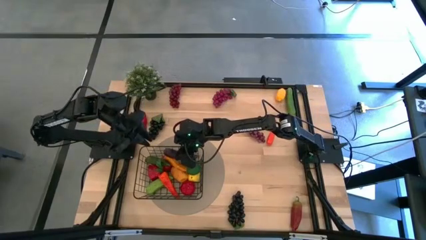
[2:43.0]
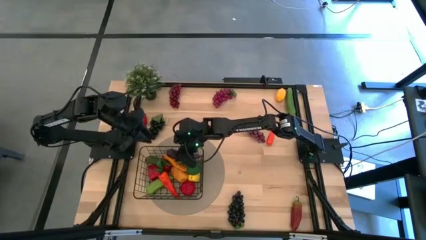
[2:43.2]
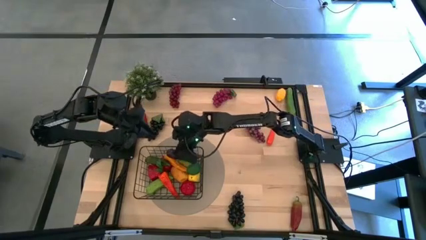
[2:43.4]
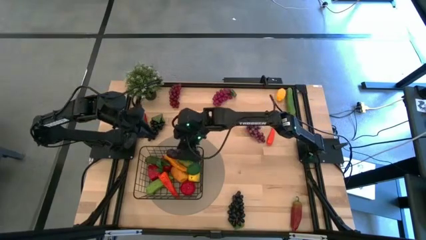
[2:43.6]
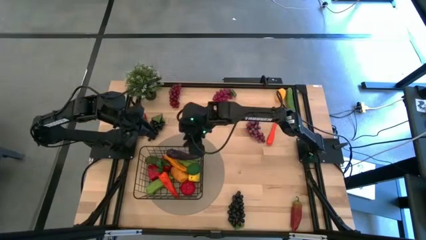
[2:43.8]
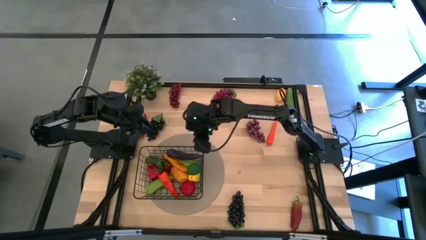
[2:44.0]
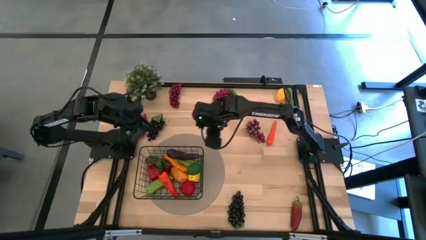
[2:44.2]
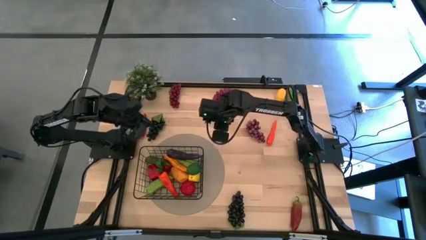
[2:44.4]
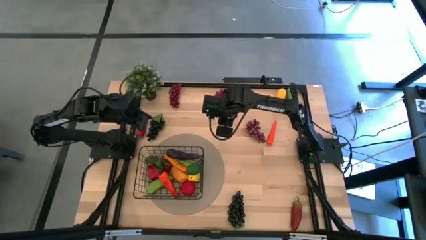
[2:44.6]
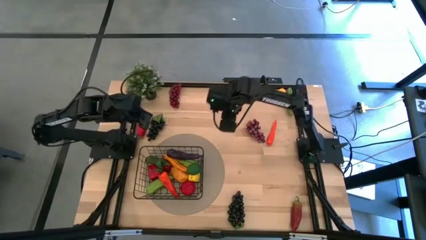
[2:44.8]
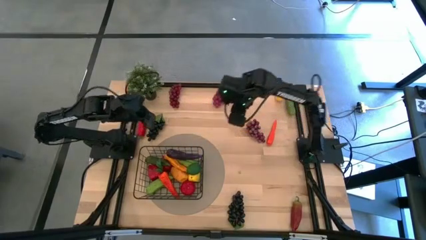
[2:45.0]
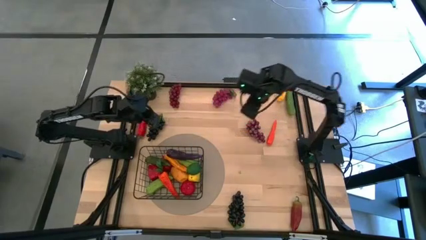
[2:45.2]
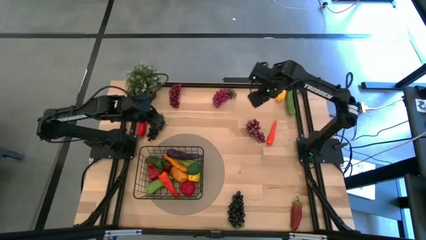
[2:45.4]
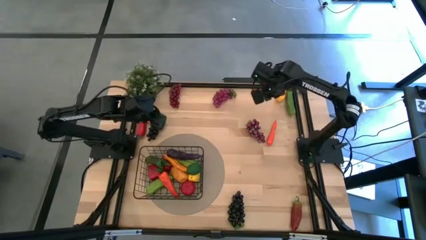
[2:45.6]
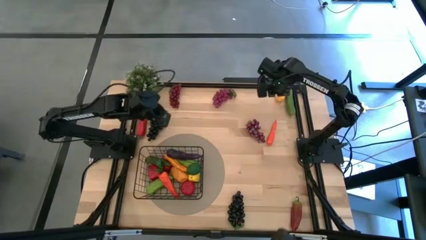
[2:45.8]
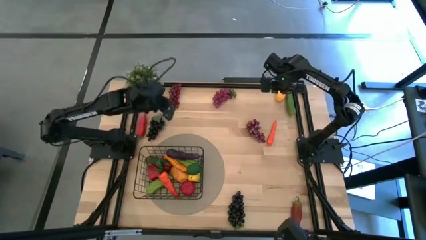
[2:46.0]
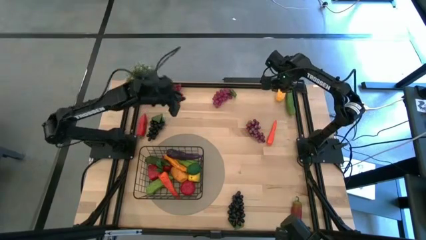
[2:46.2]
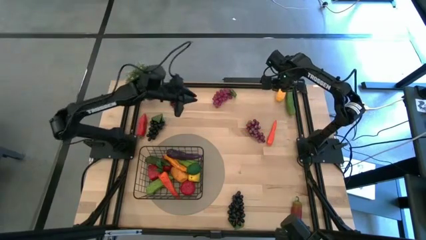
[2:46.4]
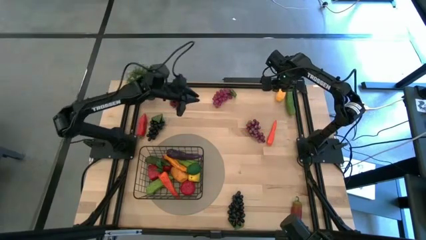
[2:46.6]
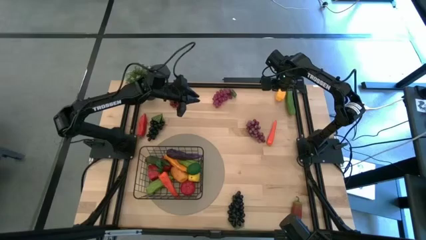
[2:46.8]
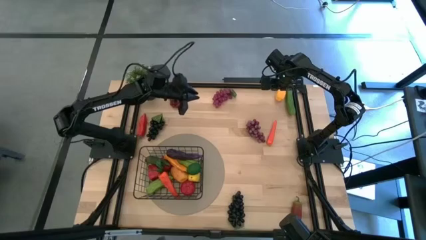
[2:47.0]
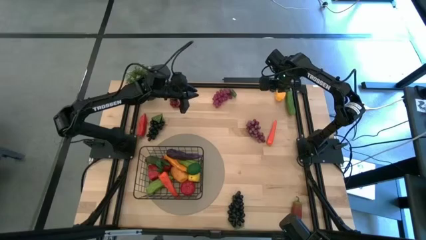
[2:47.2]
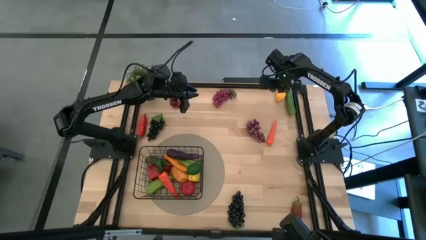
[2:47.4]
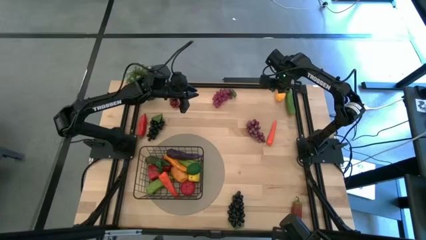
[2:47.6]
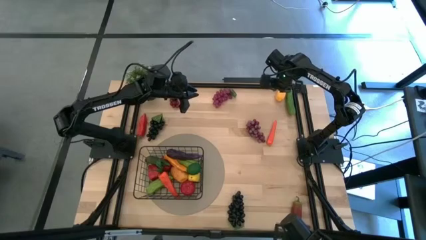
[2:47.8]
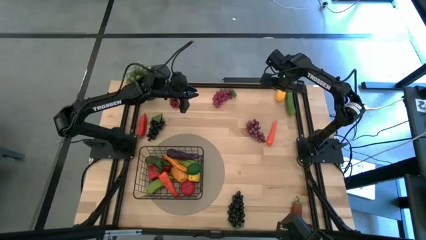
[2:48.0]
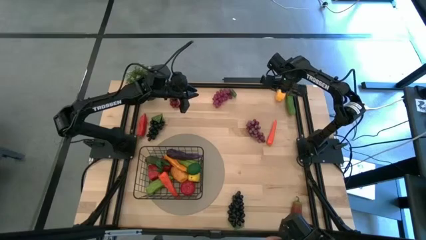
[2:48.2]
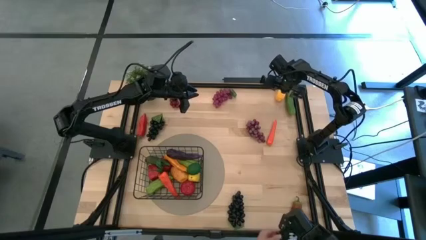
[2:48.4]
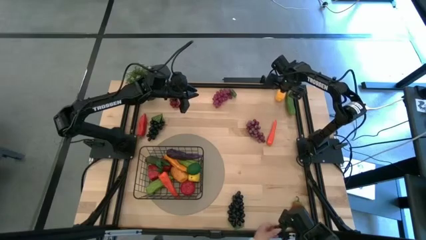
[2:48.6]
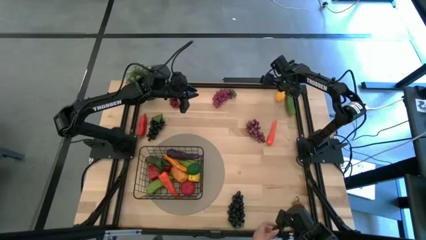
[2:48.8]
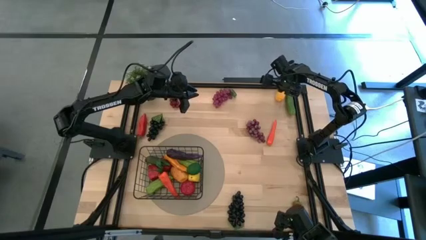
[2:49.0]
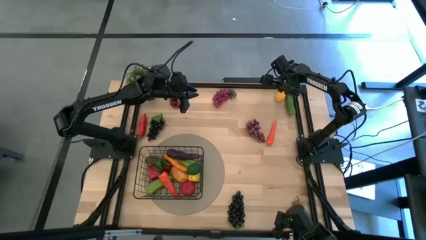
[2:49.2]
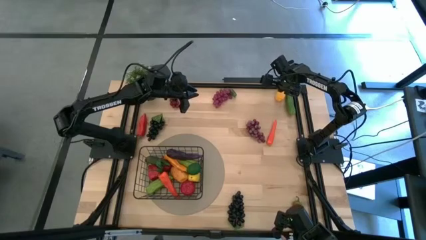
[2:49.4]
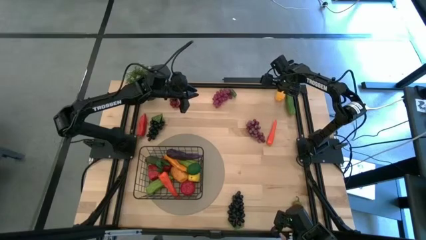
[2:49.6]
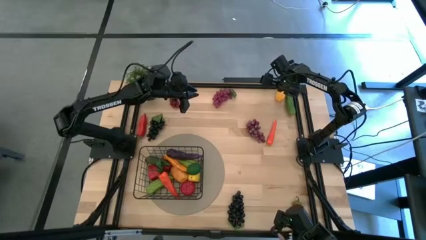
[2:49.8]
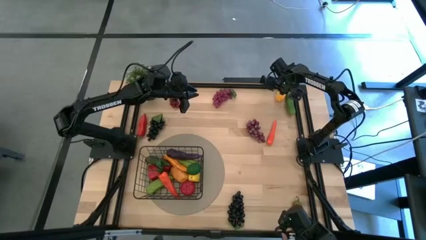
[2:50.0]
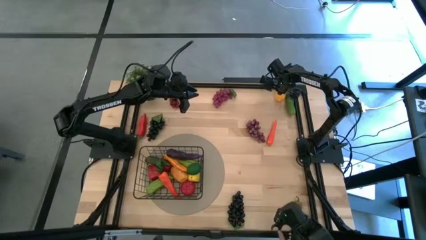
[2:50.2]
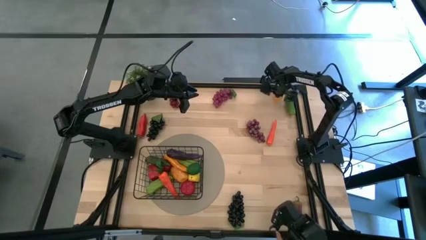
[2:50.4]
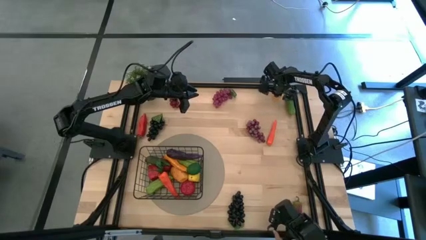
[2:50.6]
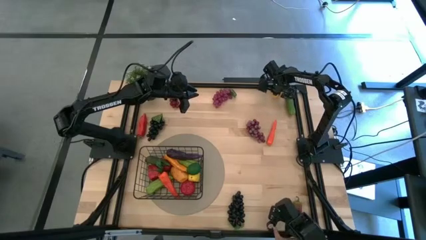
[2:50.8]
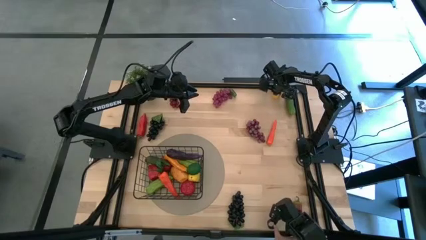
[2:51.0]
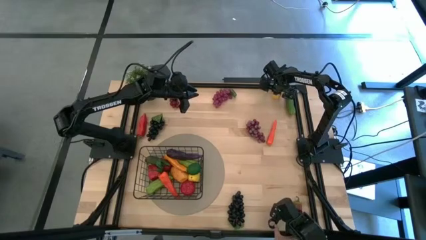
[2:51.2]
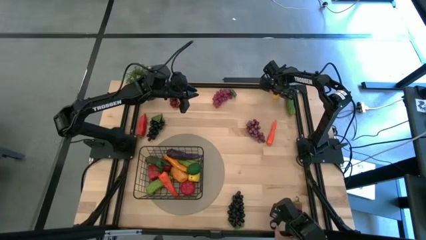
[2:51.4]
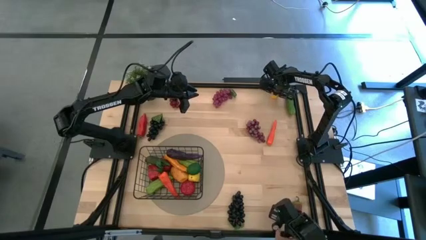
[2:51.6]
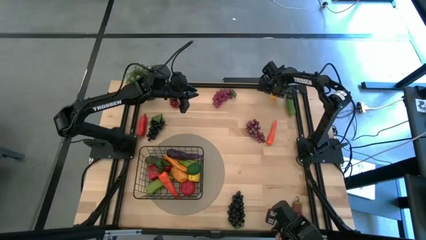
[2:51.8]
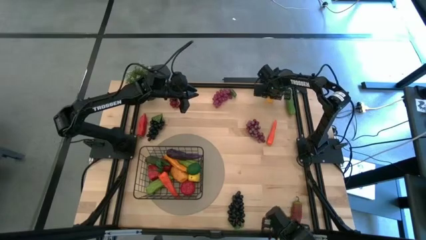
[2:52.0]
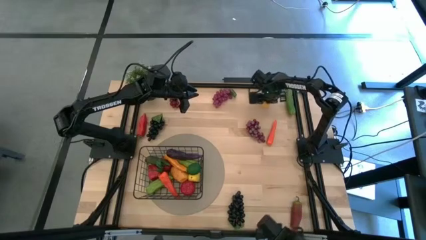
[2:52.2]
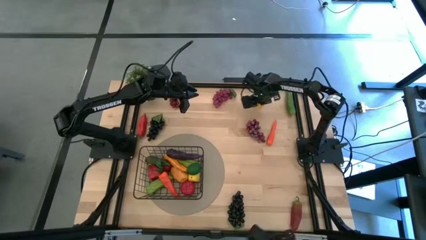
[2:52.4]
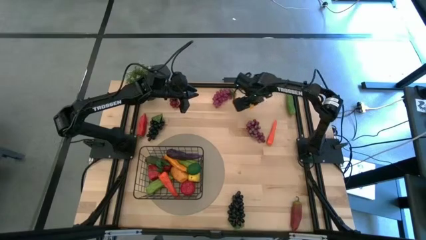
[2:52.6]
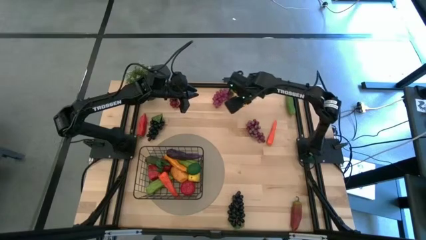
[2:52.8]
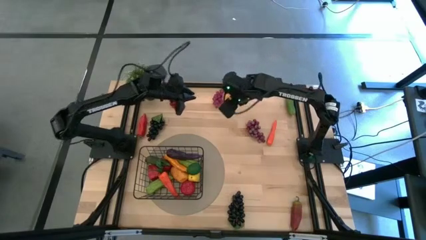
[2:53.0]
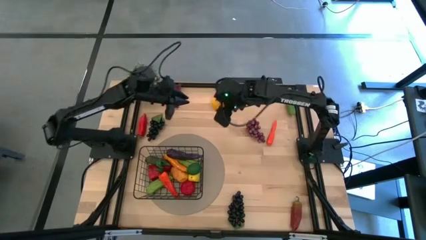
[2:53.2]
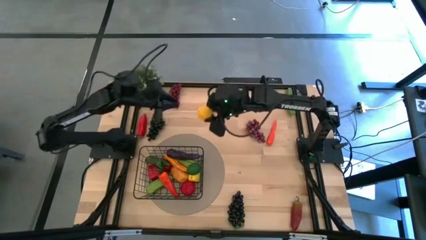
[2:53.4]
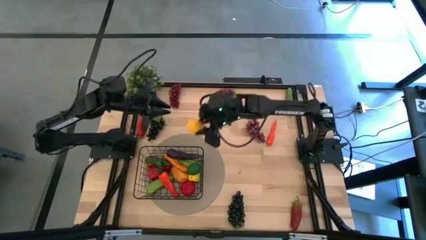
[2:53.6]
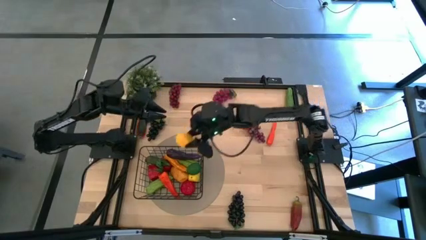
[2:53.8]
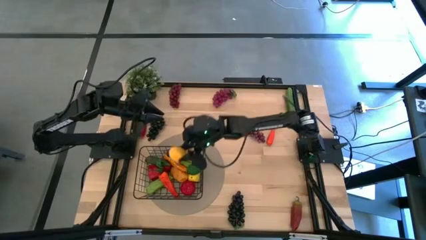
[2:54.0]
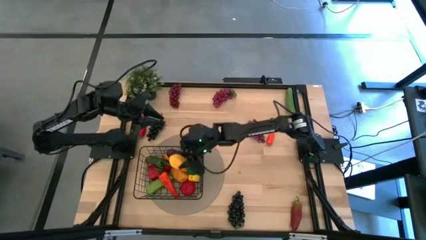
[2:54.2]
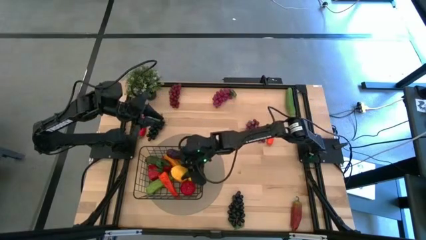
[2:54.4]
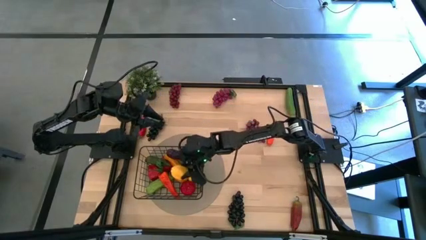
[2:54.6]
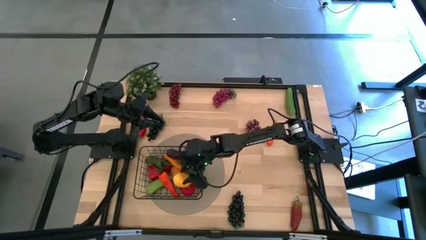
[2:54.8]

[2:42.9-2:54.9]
Task: Build produce basket
Put the yellow lemon into the black wire basket

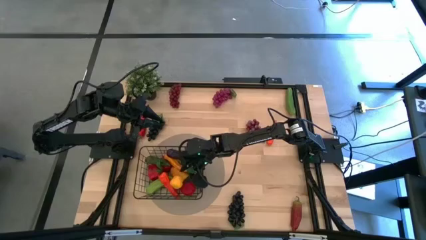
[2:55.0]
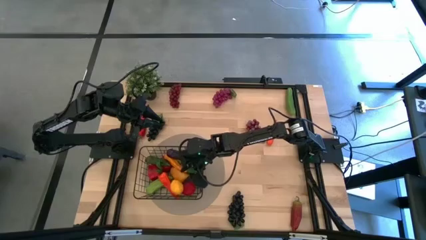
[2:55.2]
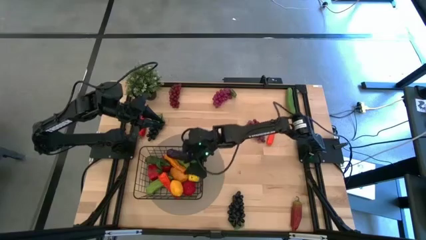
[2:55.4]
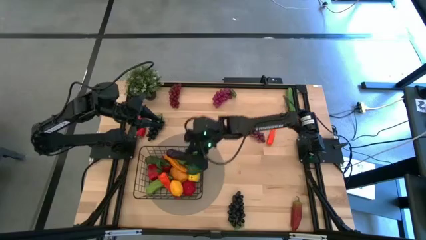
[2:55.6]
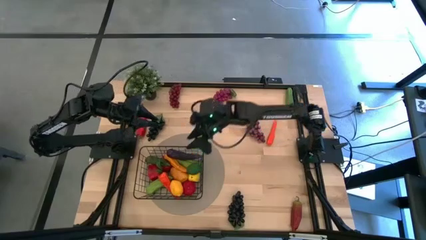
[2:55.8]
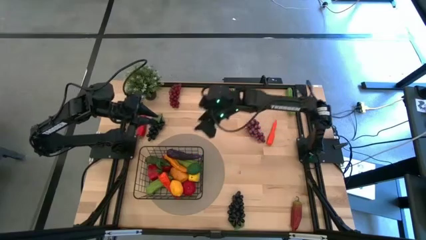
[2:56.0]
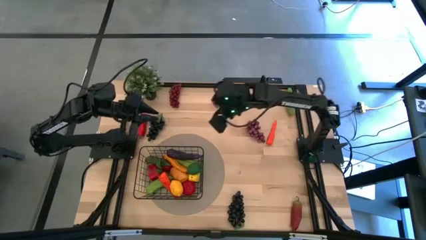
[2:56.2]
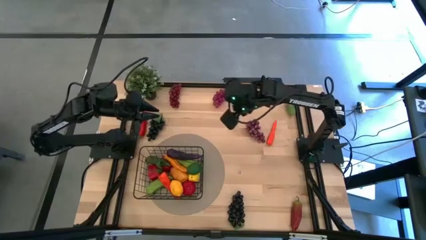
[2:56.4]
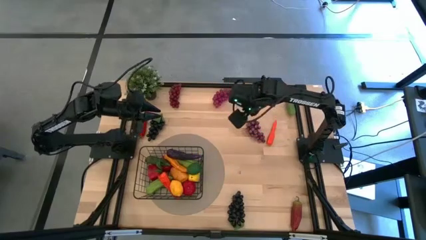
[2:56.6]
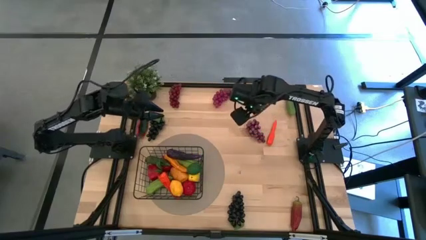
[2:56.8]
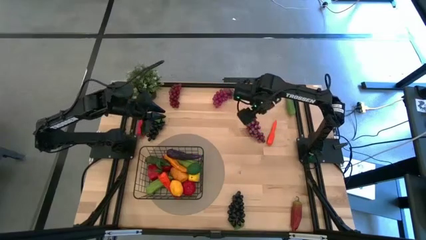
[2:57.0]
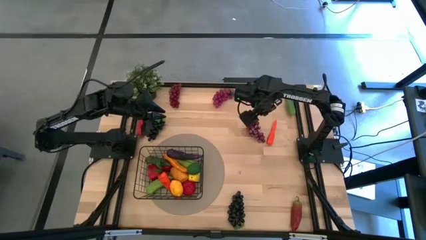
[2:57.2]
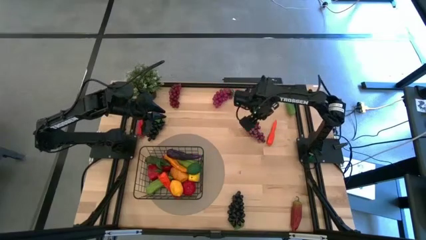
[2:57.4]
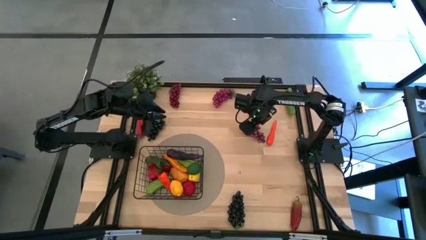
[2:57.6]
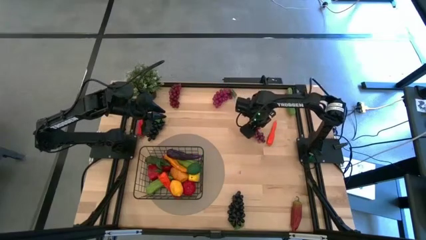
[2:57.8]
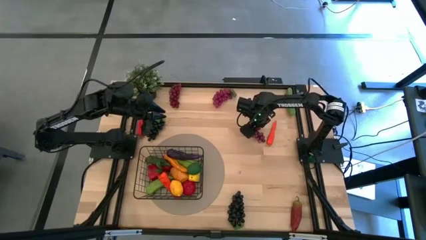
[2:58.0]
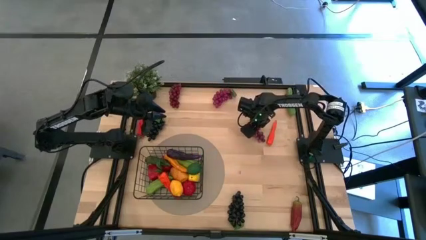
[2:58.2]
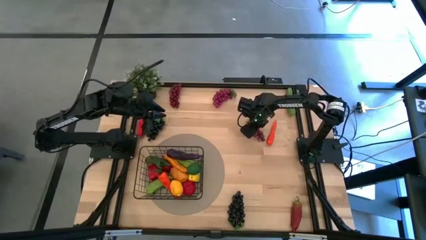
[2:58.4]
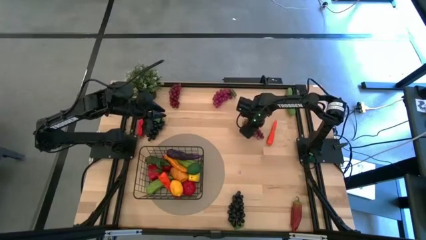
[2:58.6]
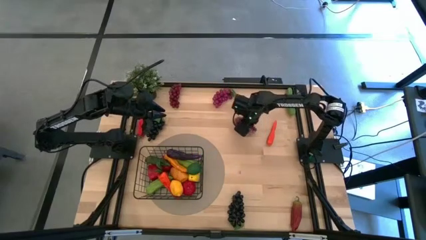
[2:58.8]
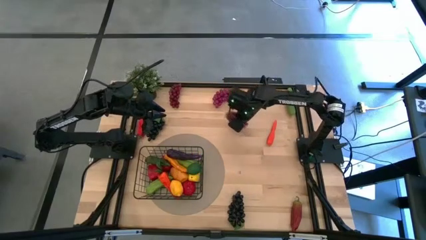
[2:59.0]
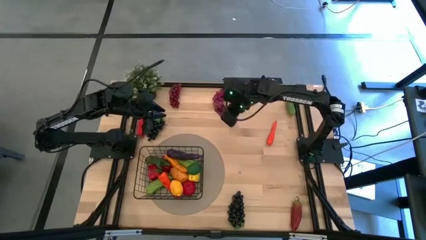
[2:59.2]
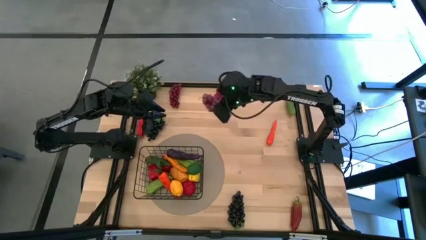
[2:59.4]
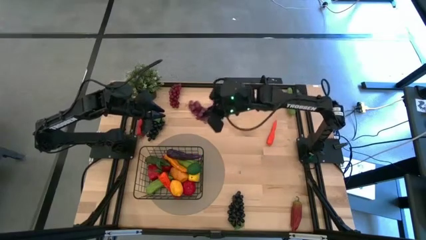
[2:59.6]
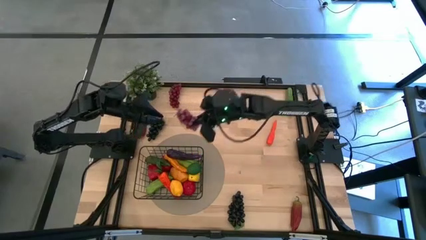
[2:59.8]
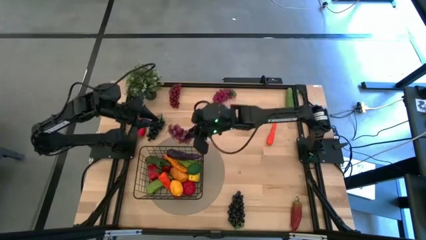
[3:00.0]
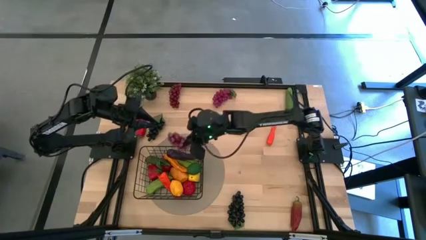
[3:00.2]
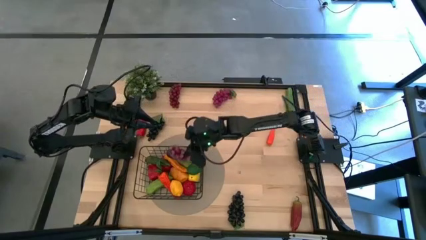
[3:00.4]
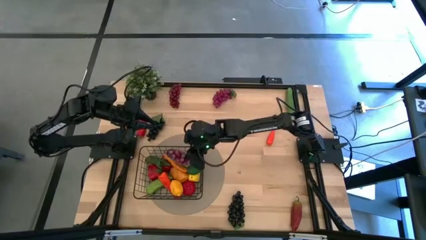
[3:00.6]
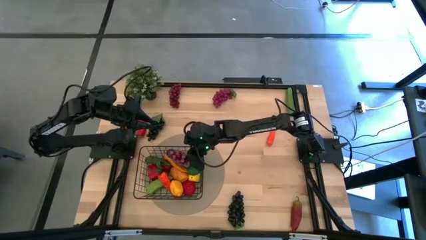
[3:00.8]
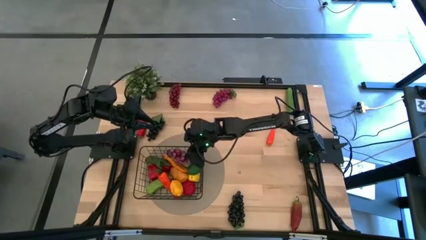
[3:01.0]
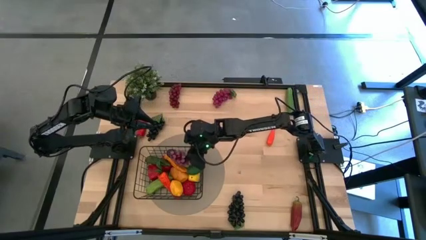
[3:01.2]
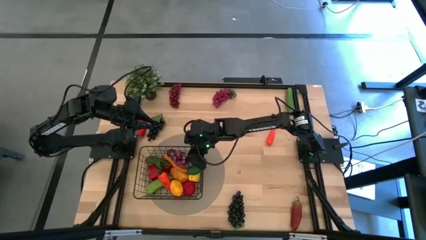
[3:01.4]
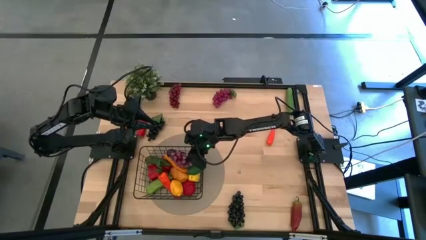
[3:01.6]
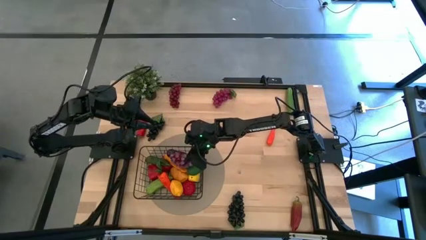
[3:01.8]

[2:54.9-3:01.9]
Put the bottom purple grapes into the black wire basket
